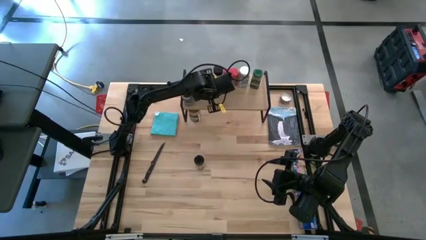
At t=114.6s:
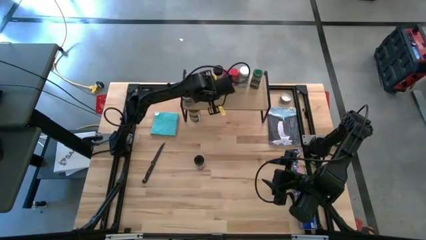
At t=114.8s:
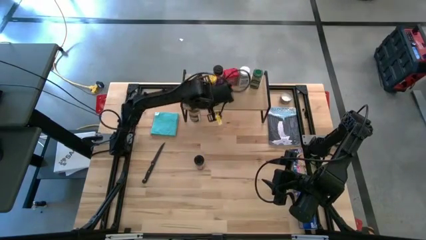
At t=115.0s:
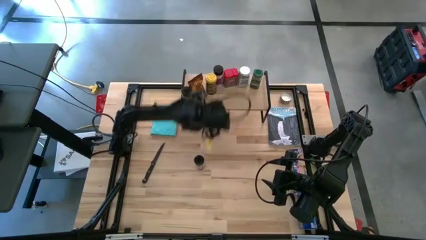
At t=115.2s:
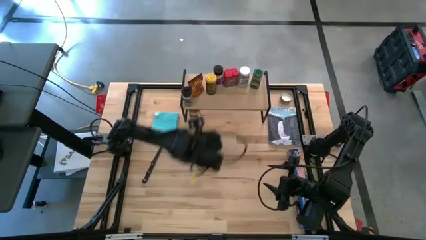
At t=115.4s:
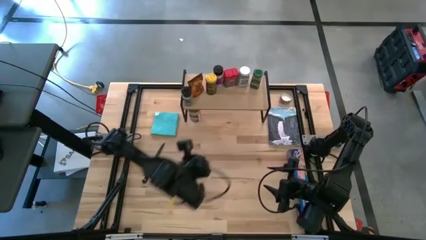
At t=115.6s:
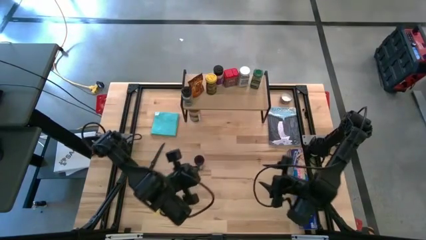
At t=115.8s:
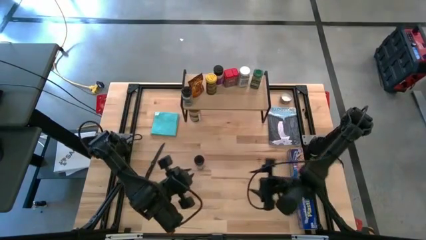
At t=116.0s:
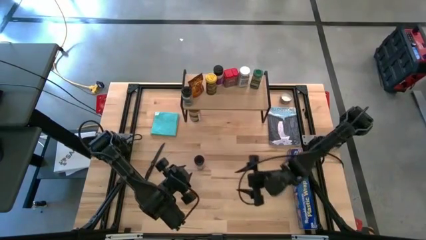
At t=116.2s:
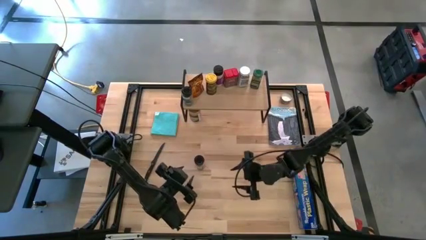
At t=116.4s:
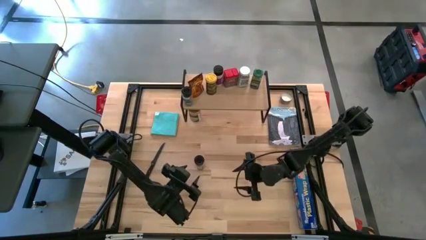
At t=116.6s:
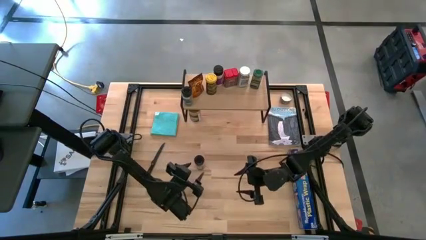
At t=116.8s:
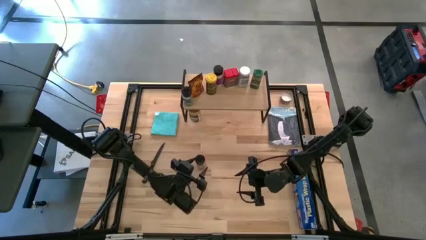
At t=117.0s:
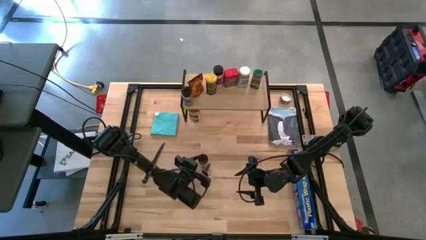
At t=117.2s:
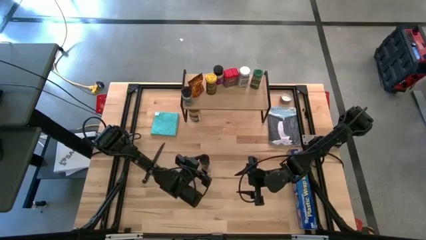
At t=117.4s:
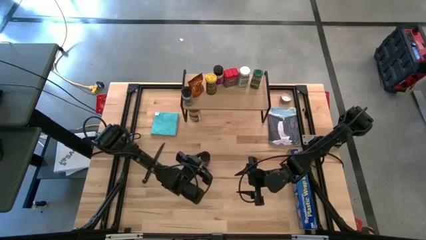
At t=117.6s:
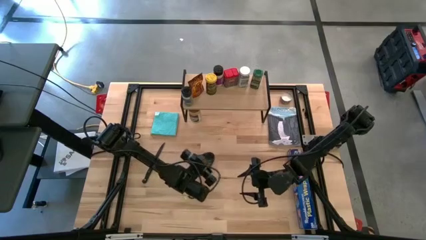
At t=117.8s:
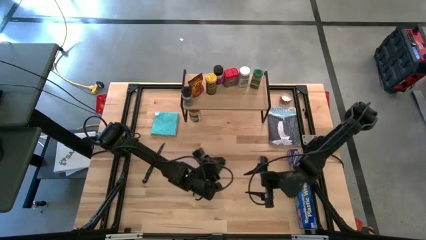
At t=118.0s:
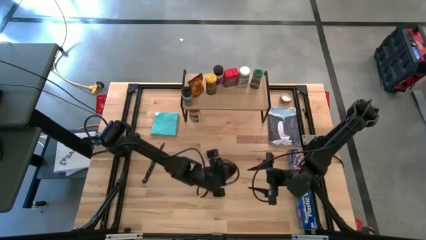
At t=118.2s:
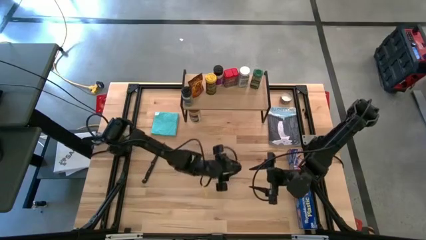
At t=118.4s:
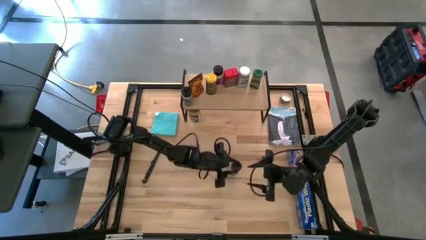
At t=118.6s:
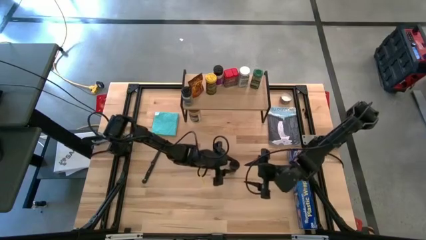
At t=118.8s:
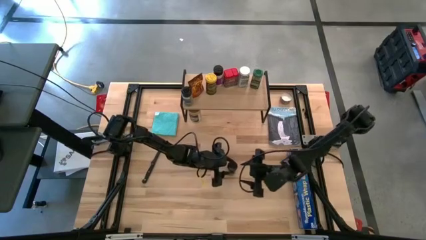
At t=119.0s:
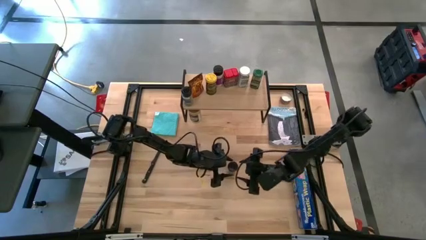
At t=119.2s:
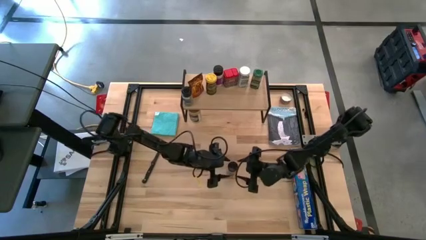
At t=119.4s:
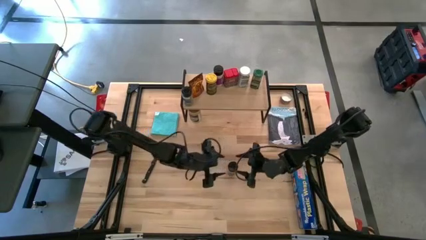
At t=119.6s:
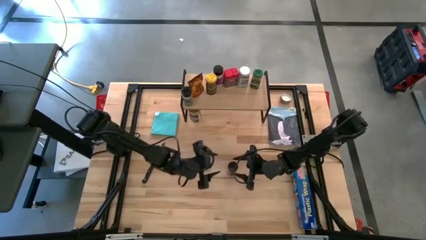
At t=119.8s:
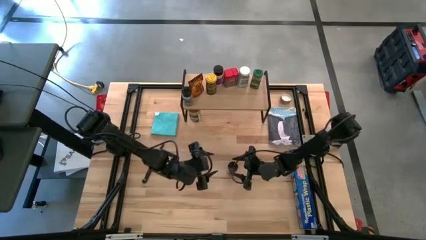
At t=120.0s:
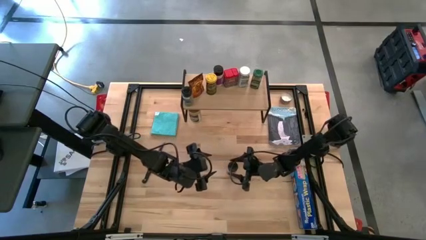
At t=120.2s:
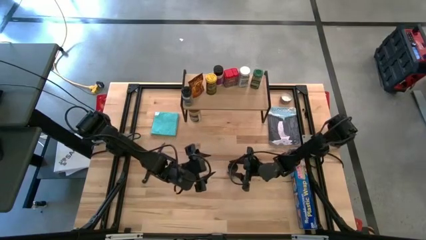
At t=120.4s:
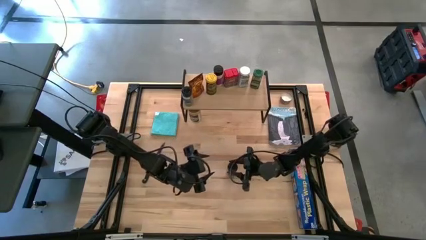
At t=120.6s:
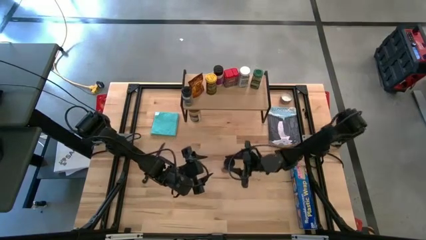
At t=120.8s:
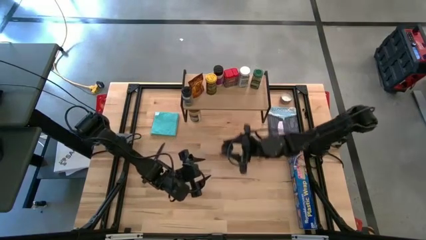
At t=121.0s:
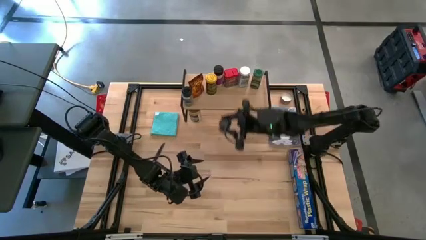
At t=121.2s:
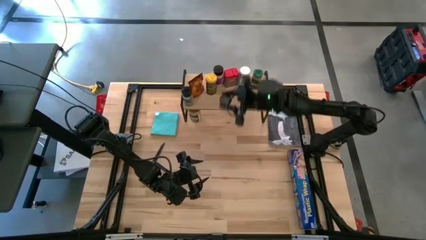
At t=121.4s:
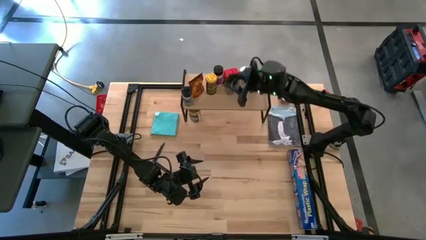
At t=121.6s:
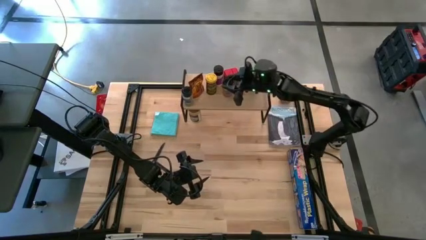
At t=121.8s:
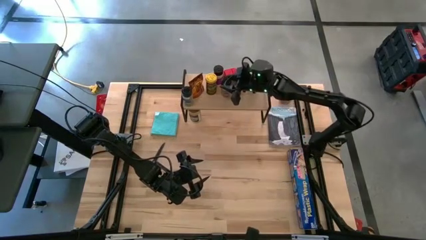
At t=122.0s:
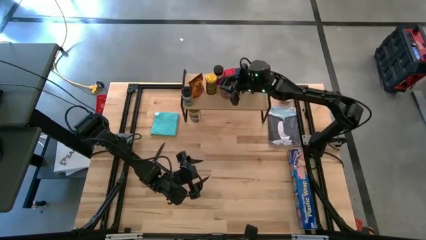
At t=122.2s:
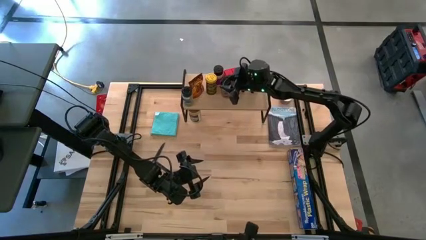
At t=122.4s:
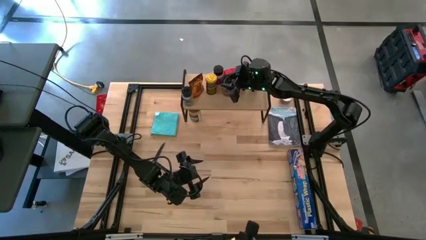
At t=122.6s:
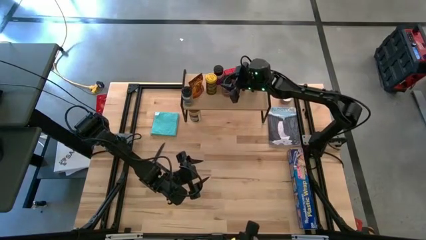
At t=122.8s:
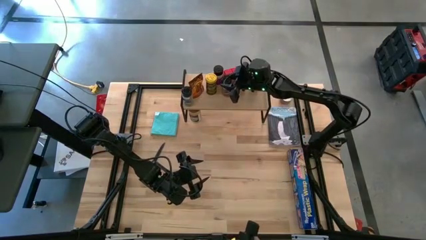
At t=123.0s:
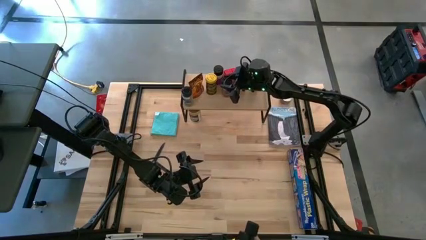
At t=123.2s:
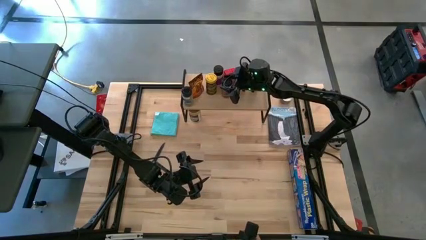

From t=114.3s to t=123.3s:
Task: Shelf spices
Put the black seasoning bottle on the shelf

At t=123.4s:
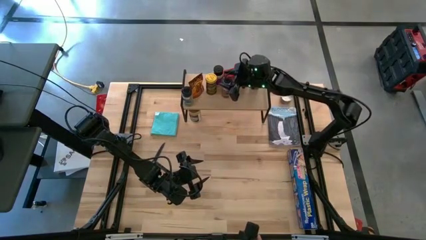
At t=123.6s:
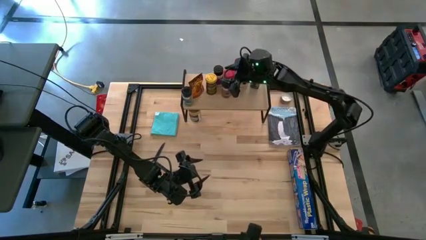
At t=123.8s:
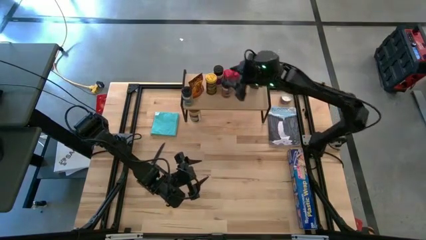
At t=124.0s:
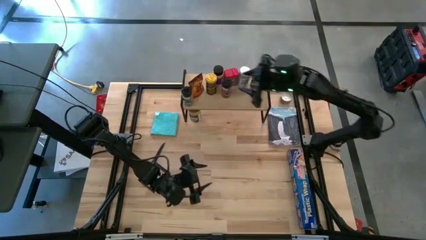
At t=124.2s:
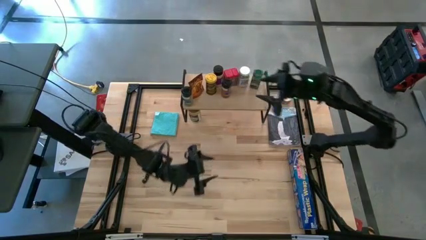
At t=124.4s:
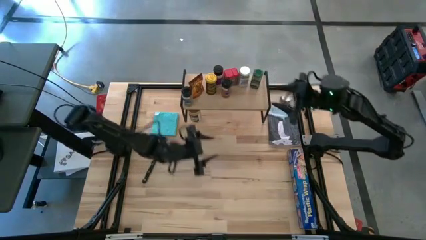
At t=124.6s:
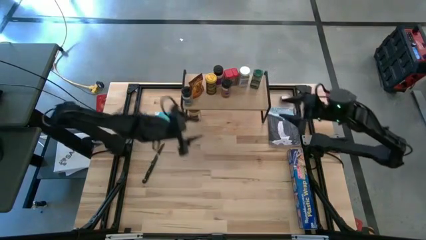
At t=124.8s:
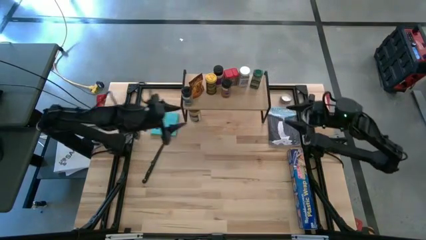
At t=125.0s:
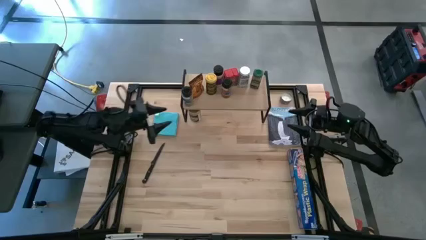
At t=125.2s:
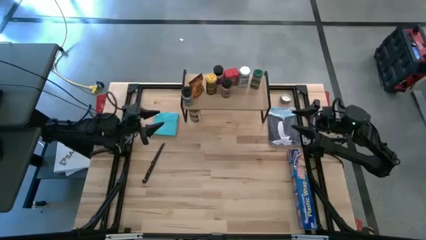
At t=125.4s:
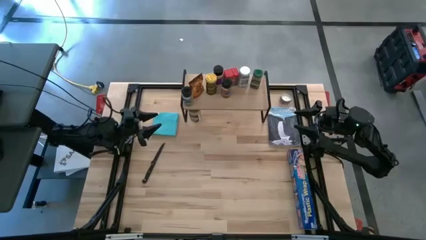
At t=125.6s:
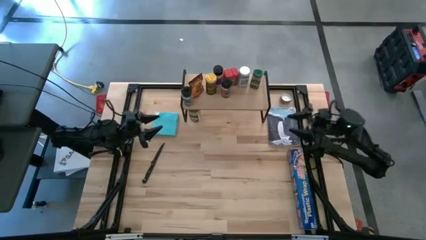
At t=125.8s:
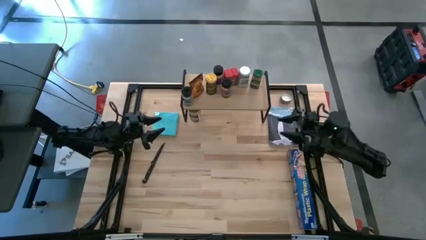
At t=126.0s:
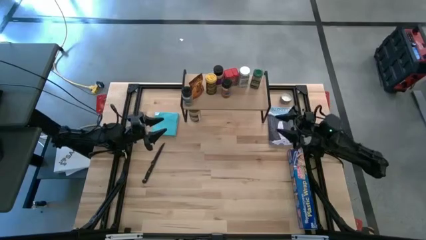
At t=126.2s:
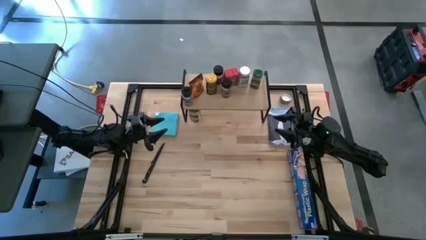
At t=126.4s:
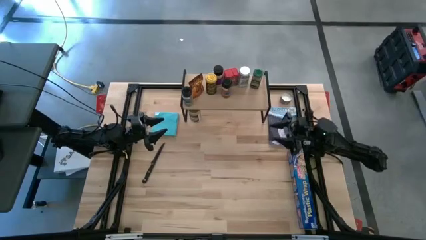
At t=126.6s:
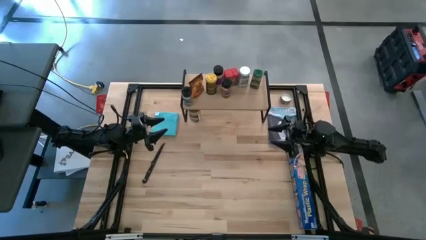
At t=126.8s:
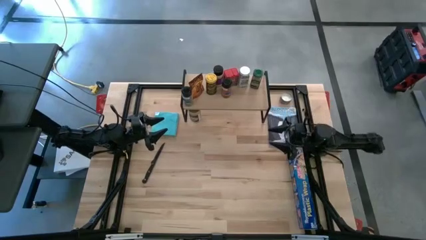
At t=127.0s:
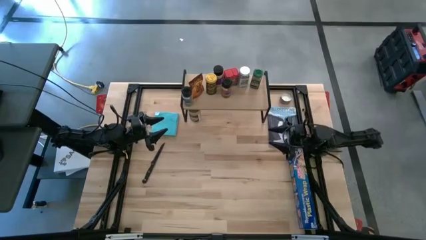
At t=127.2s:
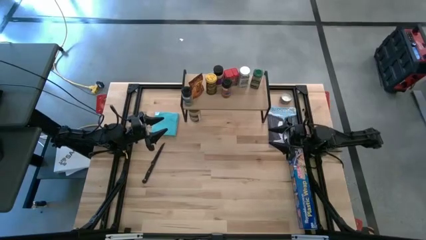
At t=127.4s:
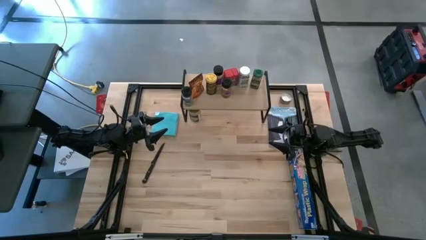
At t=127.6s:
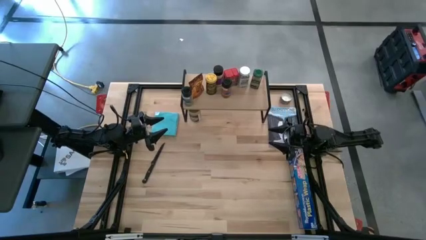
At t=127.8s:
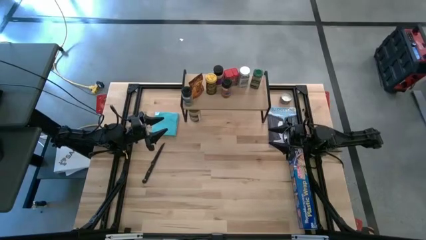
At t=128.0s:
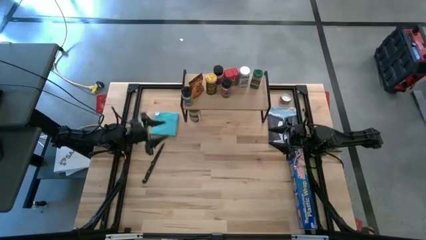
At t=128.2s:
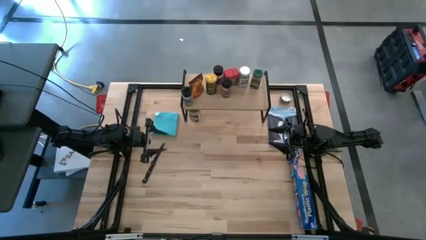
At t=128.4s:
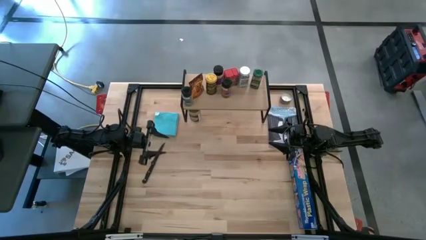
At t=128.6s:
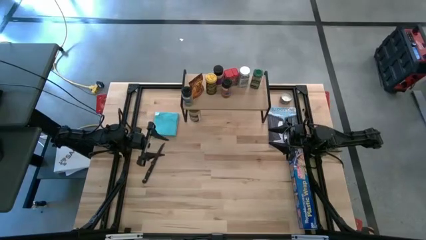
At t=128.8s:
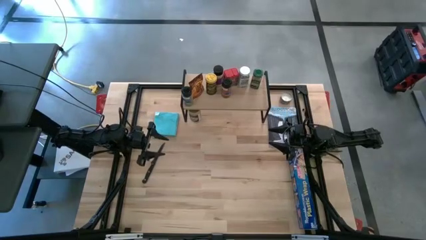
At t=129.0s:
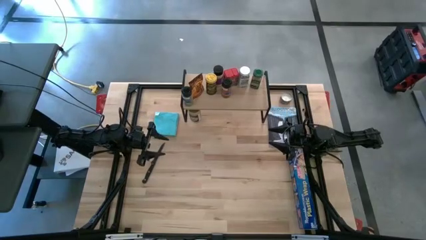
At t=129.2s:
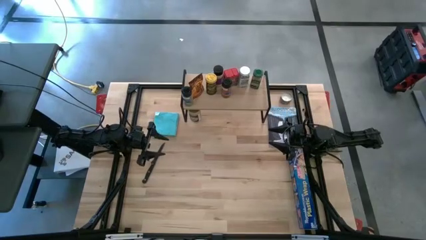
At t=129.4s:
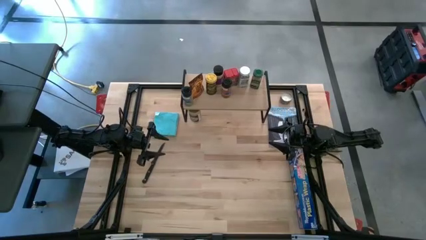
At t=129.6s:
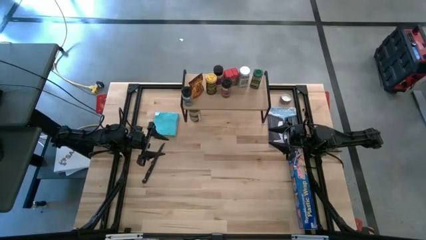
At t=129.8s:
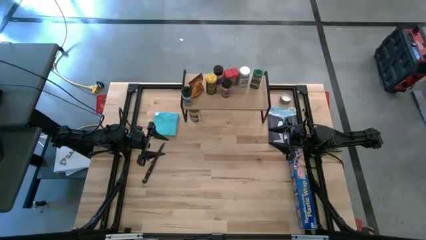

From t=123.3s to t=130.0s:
Return to Home Position
